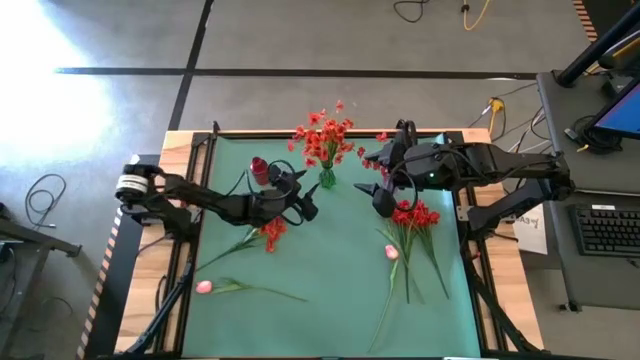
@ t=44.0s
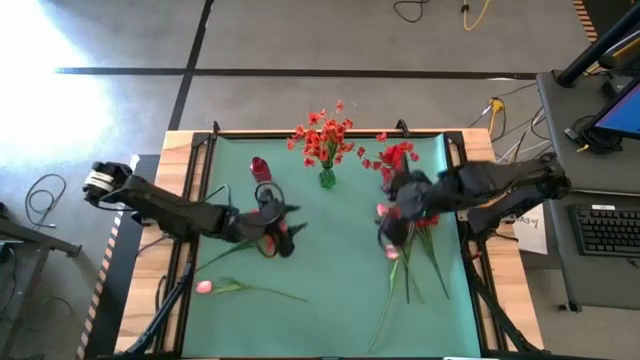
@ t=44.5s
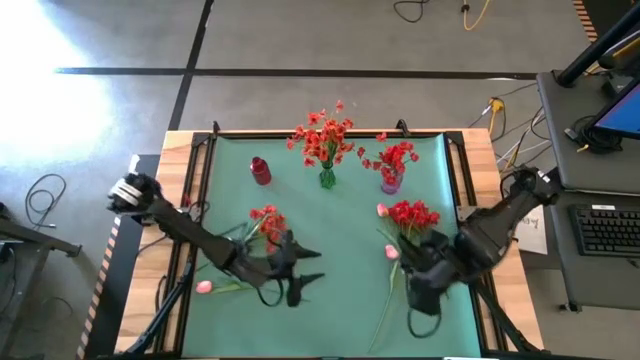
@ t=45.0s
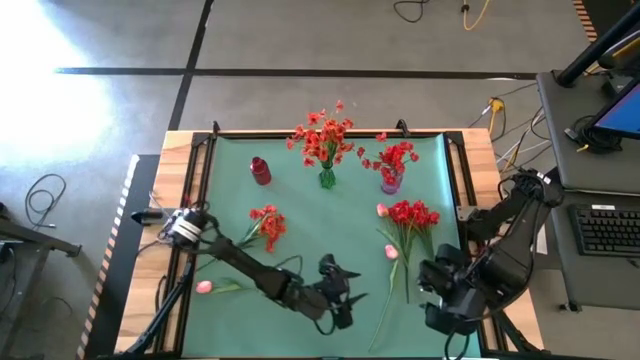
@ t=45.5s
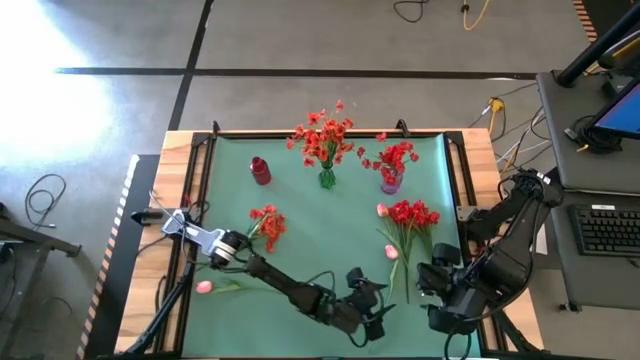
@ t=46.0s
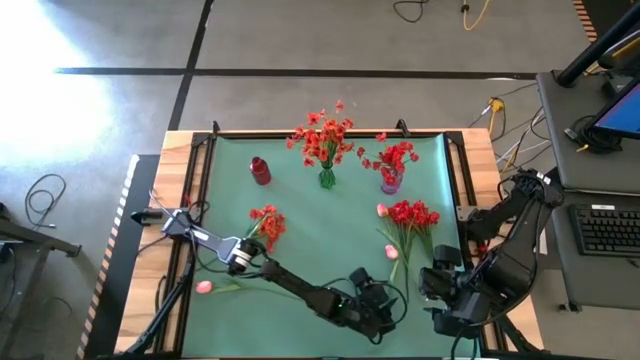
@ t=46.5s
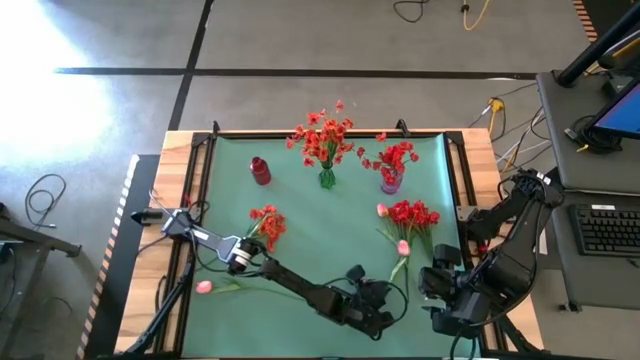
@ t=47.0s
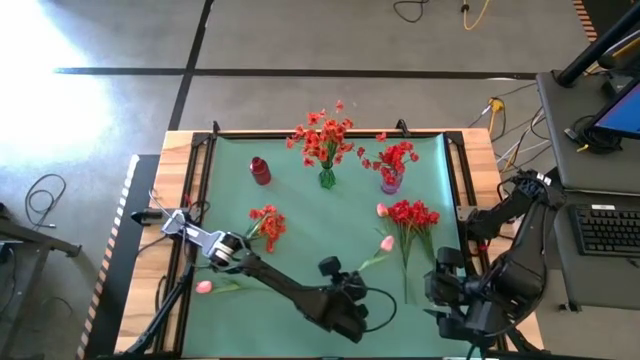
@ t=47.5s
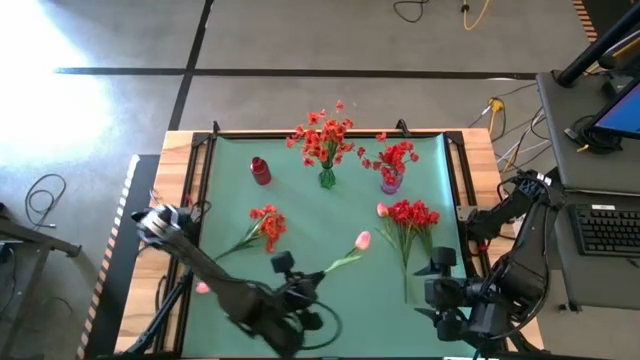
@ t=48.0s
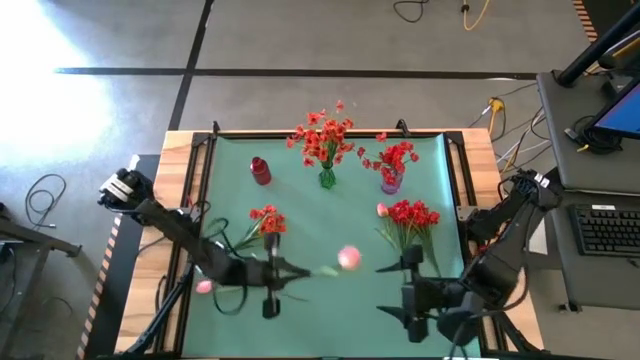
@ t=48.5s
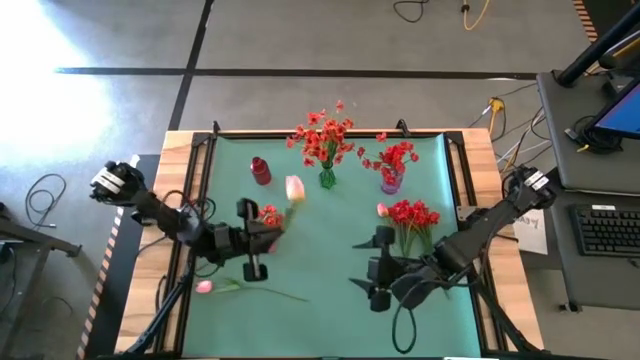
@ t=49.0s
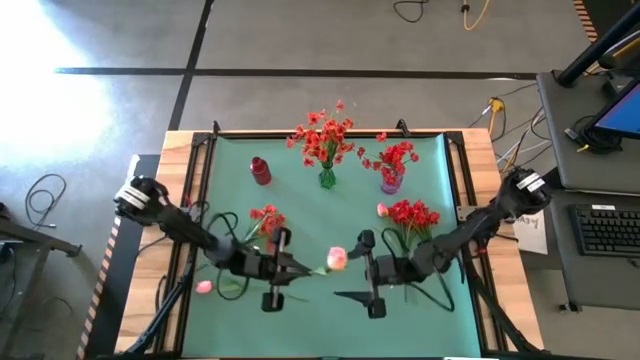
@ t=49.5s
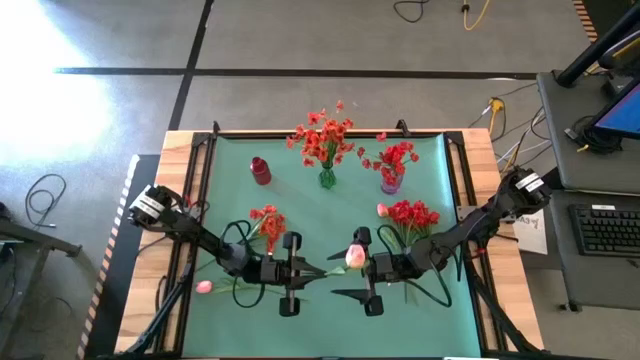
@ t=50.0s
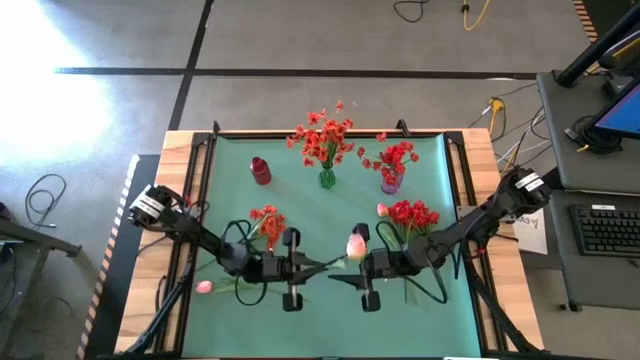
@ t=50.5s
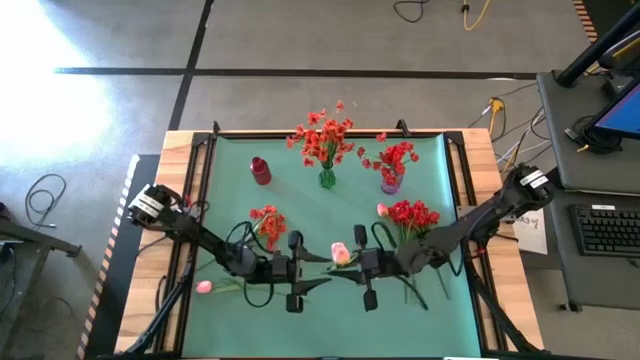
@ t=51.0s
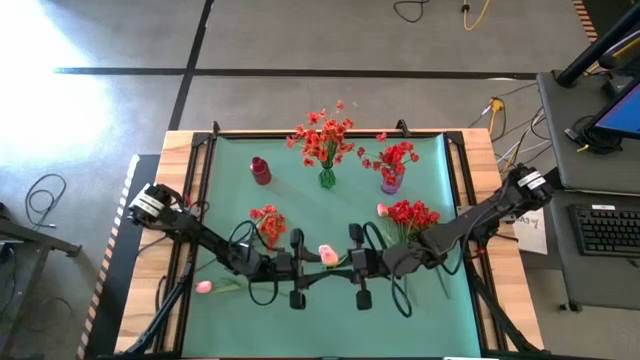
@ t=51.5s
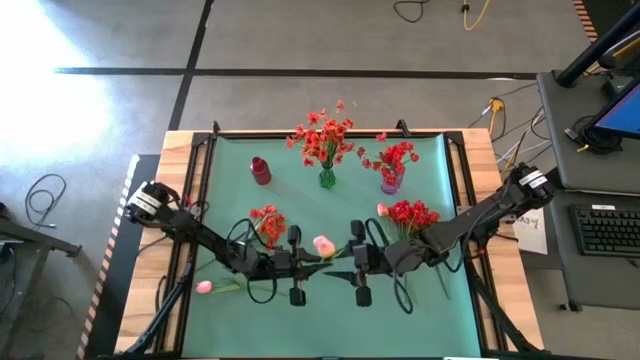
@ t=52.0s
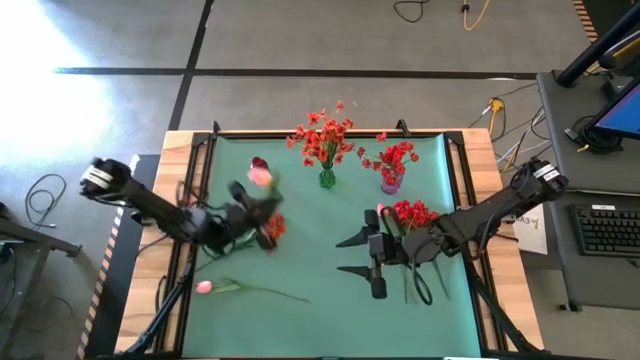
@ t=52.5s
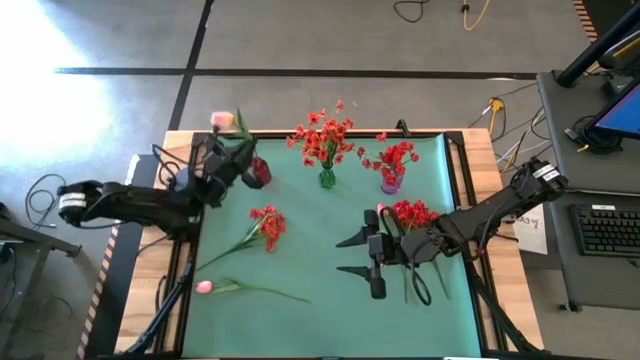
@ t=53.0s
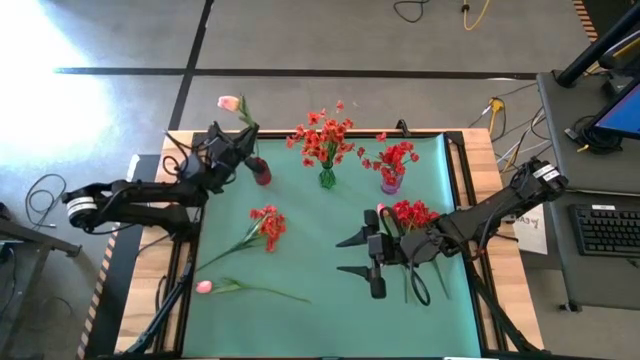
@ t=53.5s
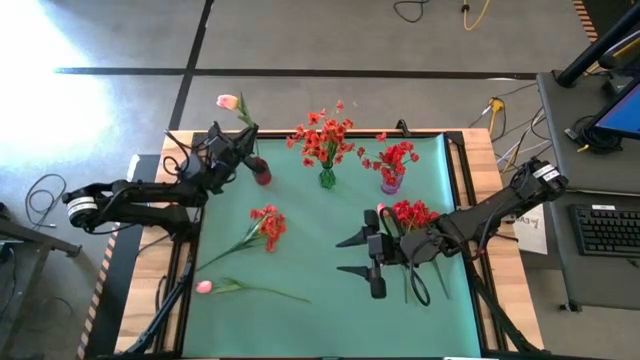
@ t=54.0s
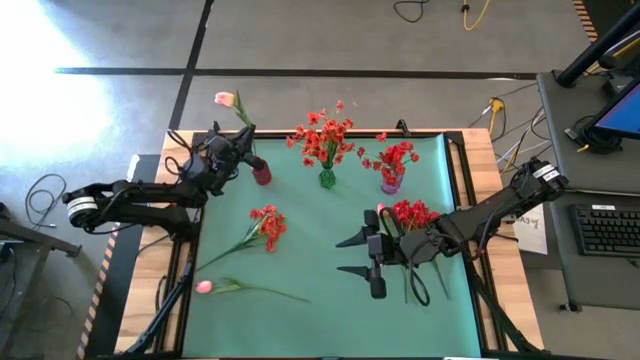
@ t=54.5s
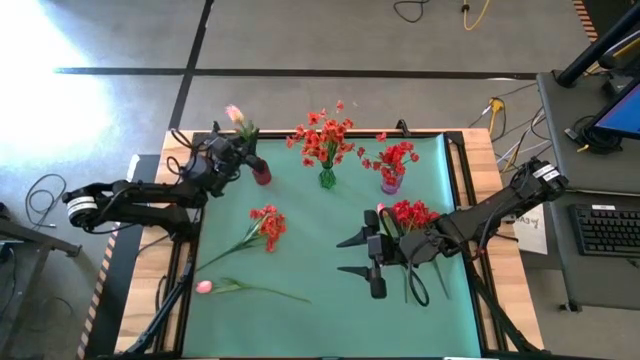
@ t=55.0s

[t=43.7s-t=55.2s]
Task: Sort flowers into vase by color
Put the bottom right pink flower in the red flower vase

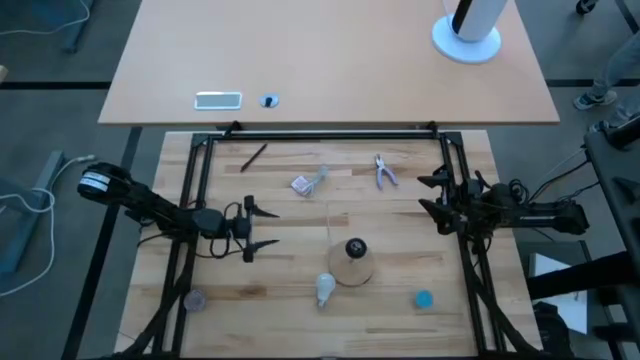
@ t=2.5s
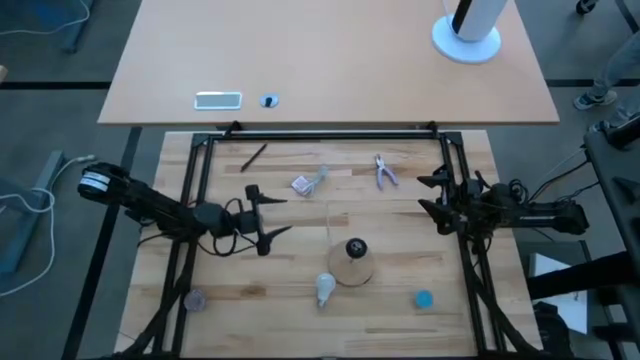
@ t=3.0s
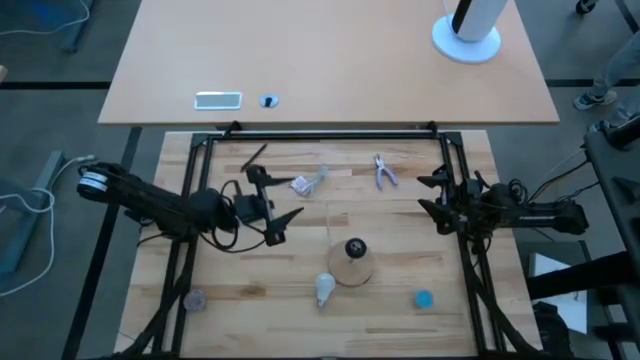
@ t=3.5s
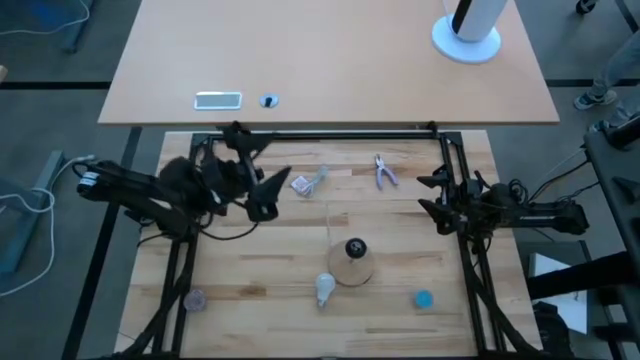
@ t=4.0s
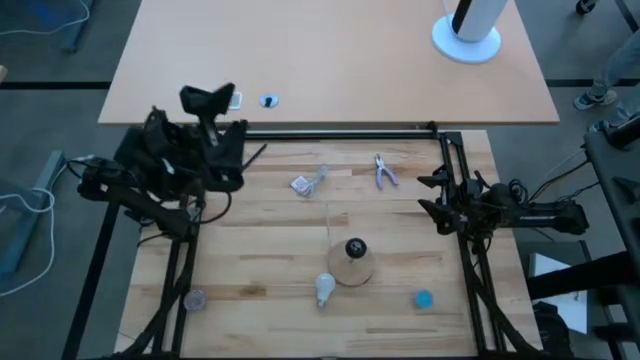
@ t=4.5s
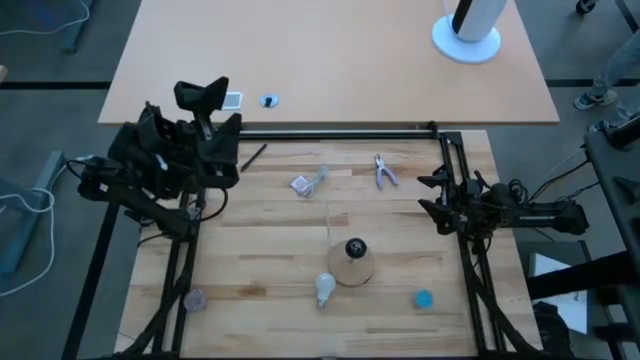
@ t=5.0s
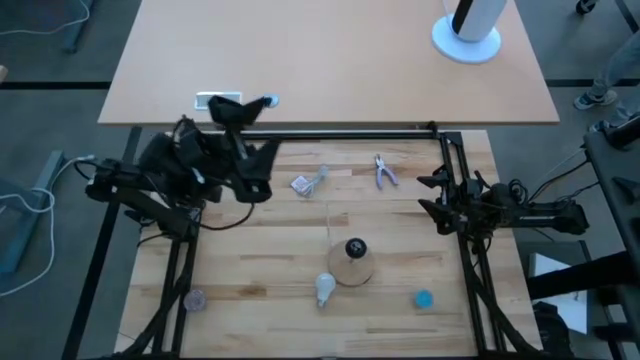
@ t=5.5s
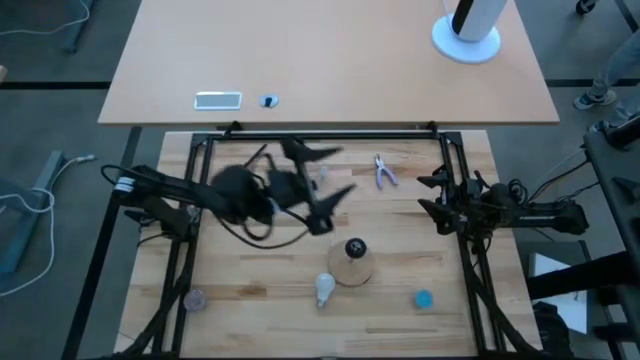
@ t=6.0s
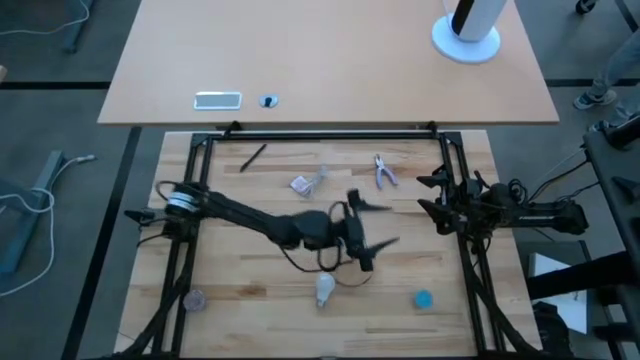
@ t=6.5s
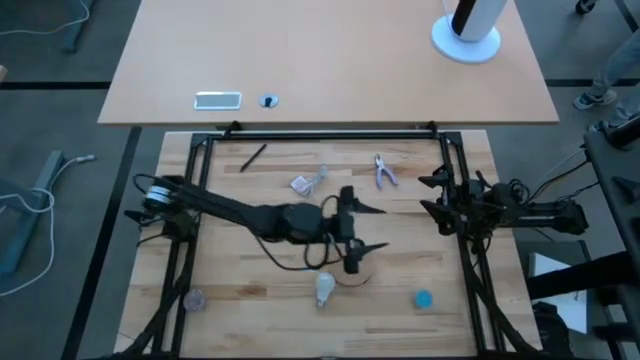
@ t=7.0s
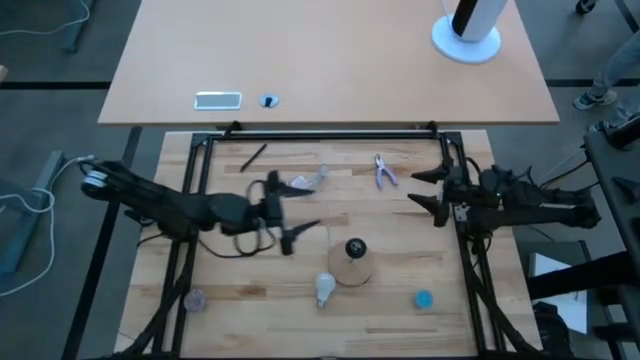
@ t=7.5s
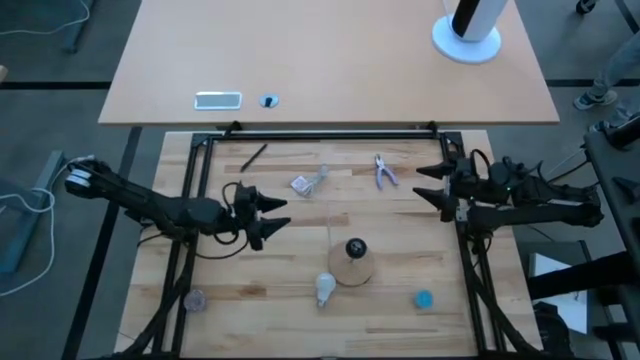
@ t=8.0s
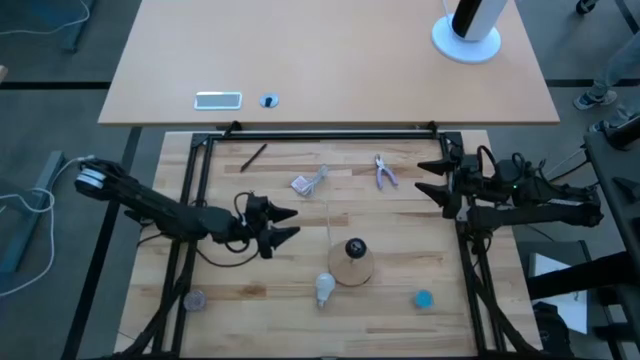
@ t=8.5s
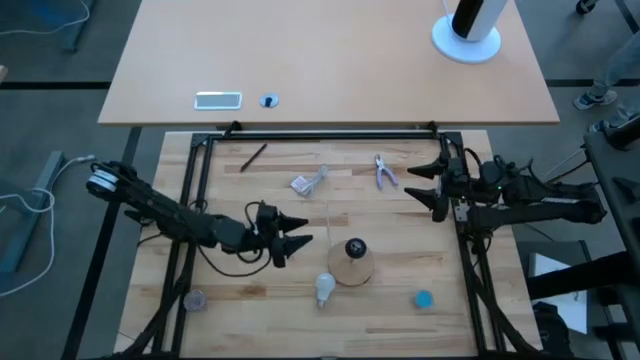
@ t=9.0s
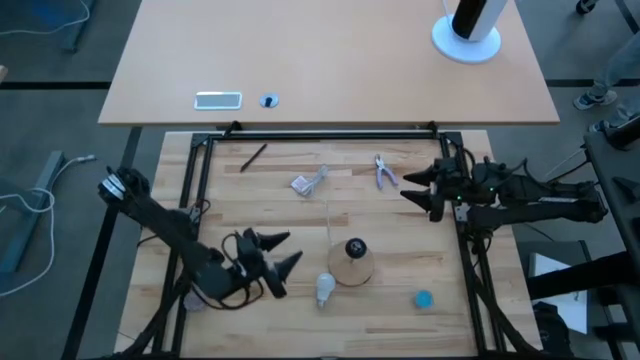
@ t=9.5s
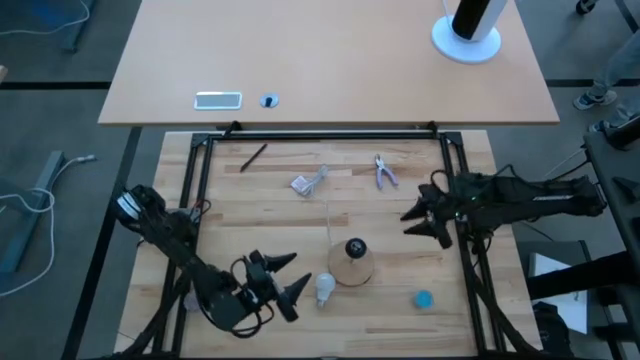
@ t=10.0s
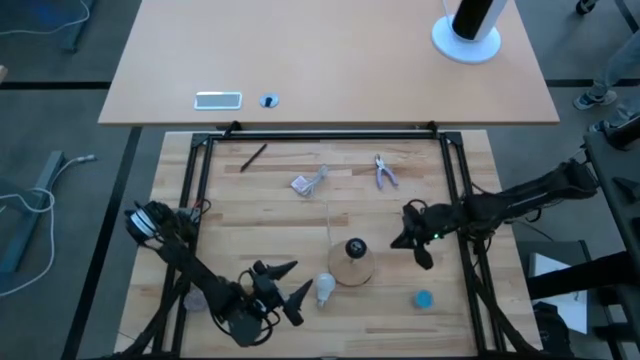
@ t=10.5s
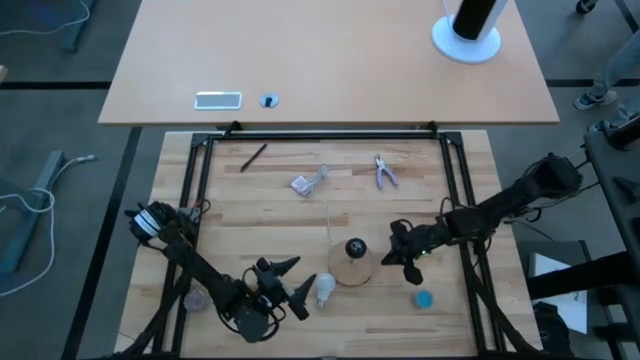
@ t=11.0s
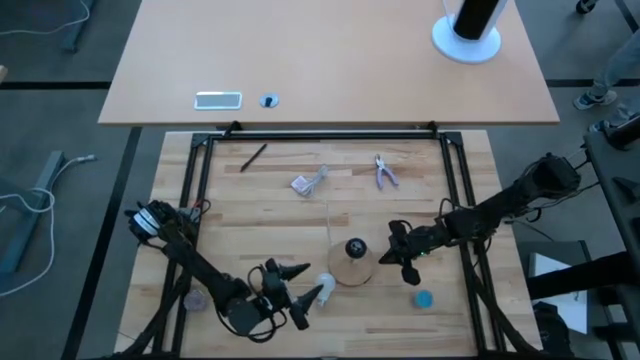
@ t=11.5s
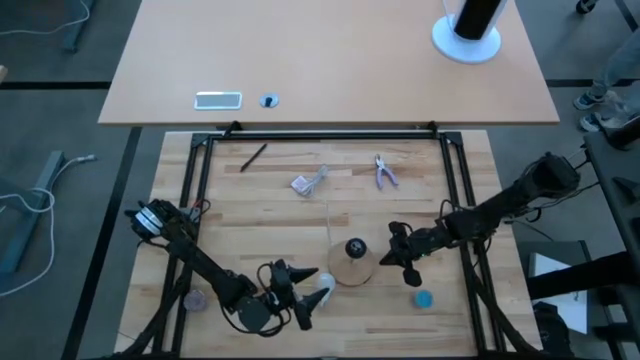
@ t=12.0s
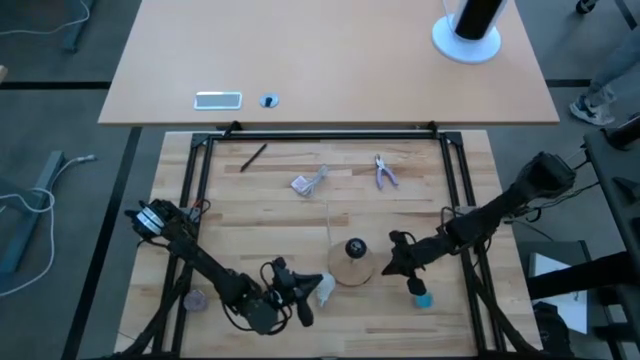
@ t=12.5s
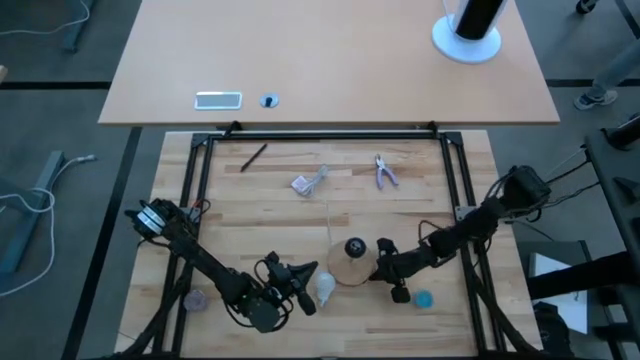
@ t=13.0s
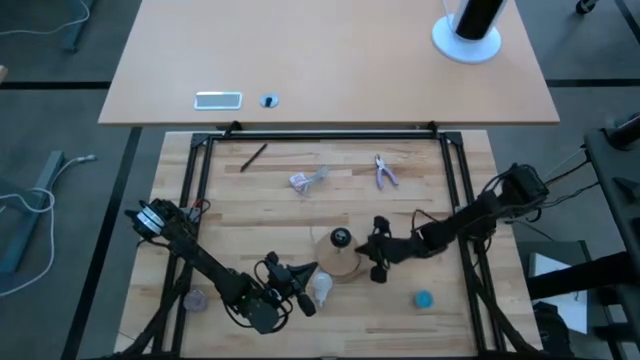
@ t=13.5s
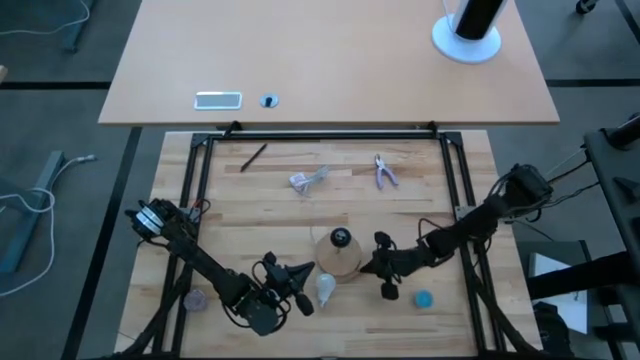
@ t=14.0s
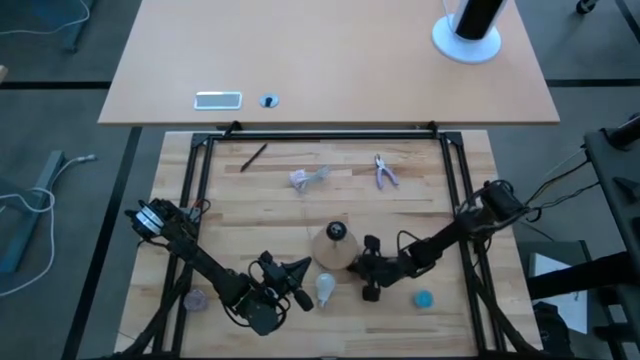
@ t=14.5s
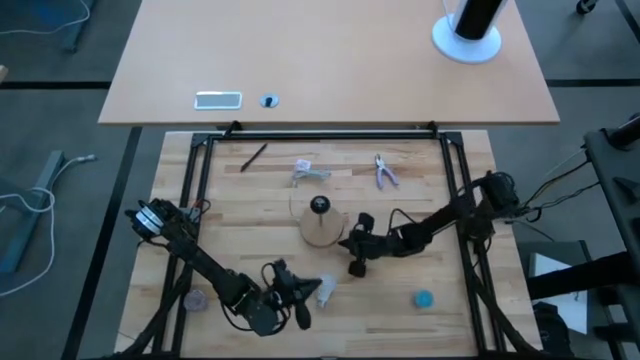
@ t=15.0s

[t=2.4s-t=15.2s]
Task: Screw lightbulb
Adjust the brown lamp
